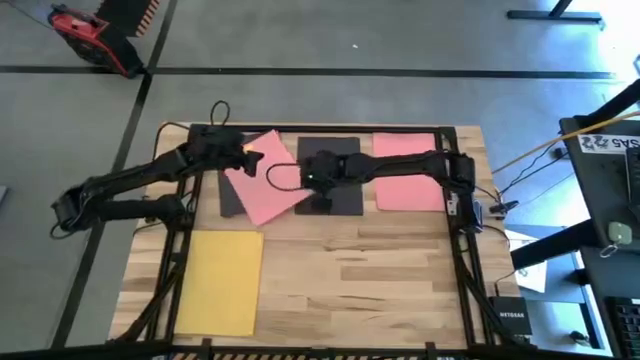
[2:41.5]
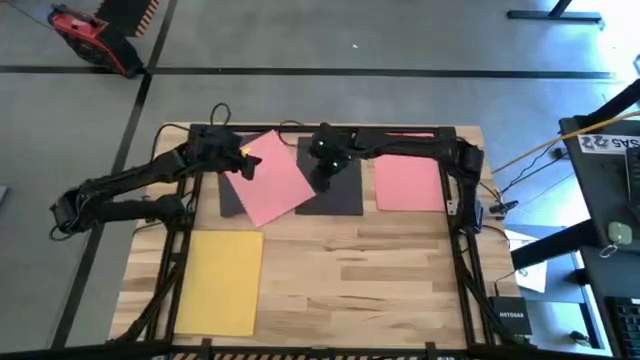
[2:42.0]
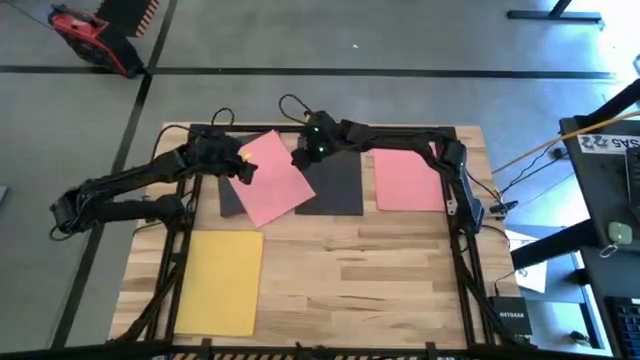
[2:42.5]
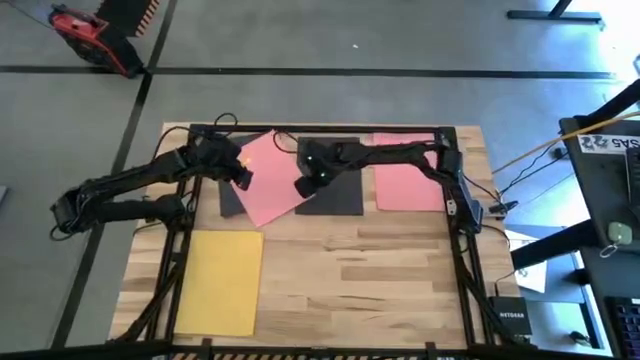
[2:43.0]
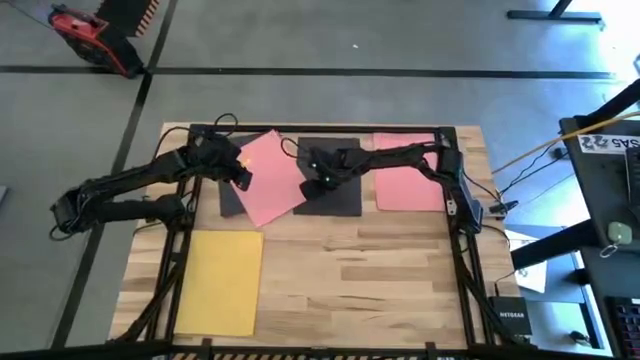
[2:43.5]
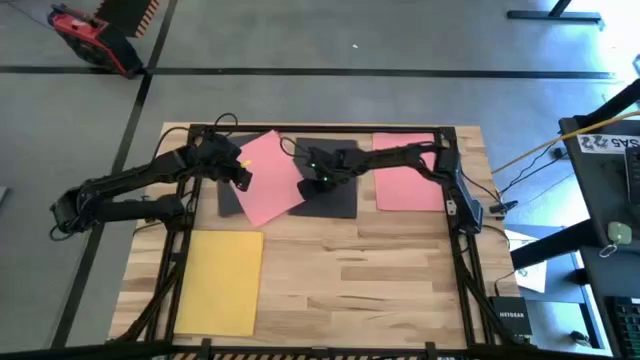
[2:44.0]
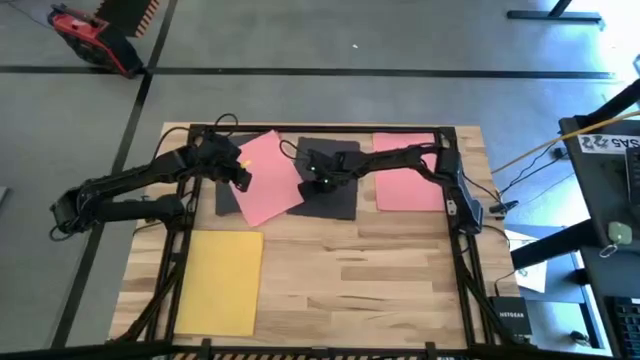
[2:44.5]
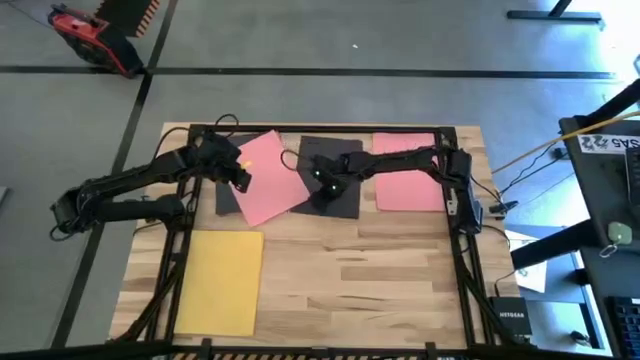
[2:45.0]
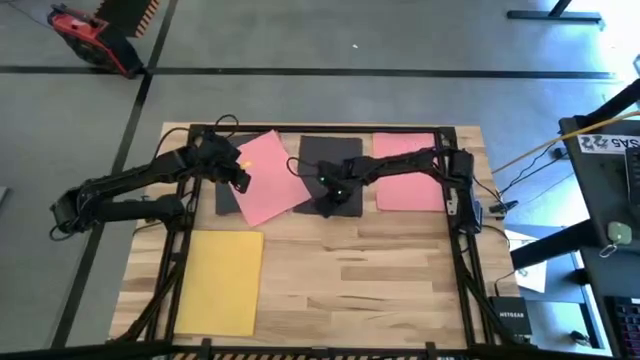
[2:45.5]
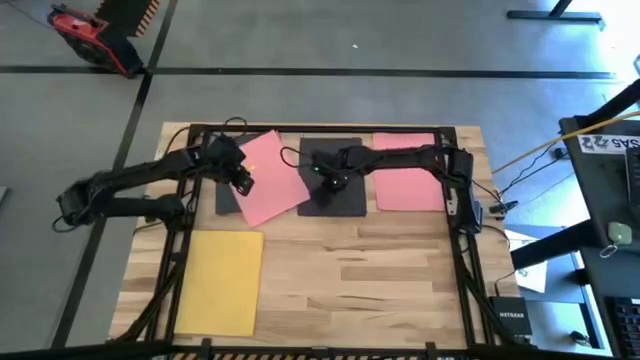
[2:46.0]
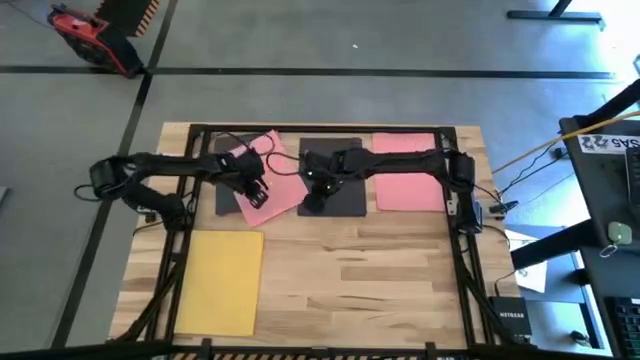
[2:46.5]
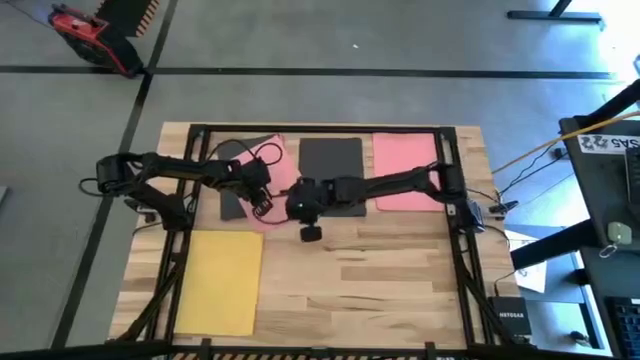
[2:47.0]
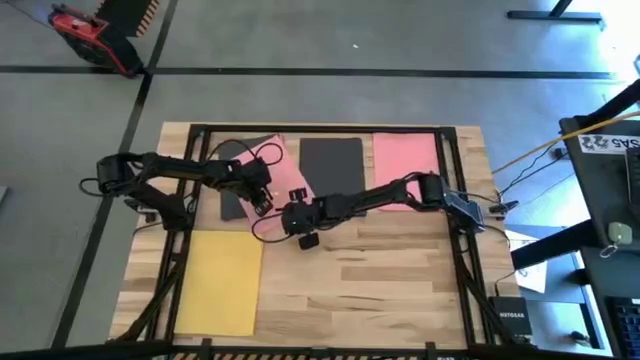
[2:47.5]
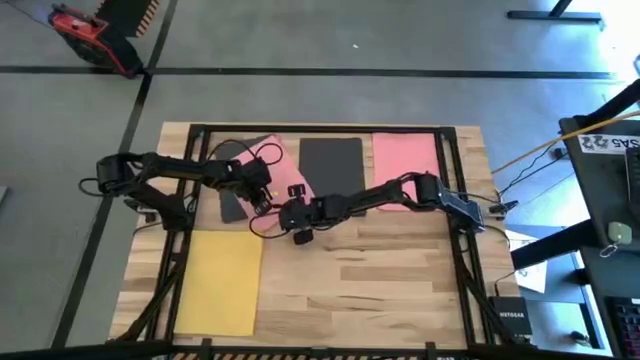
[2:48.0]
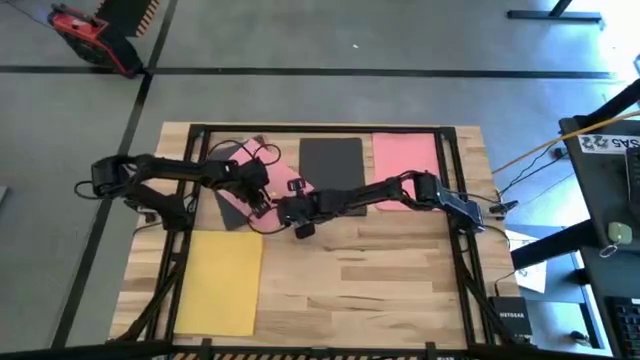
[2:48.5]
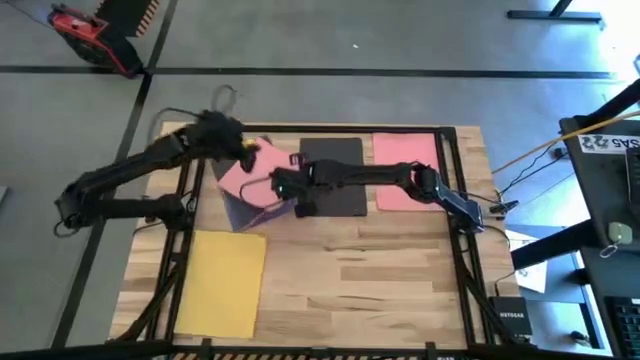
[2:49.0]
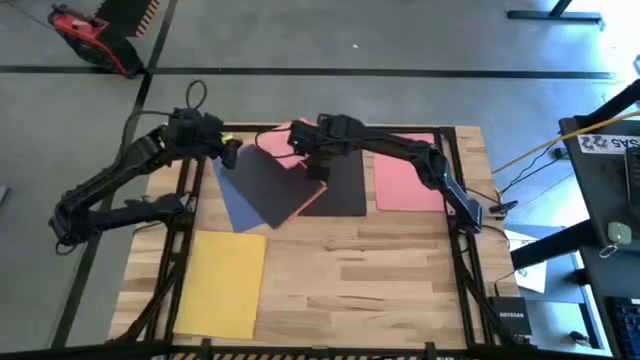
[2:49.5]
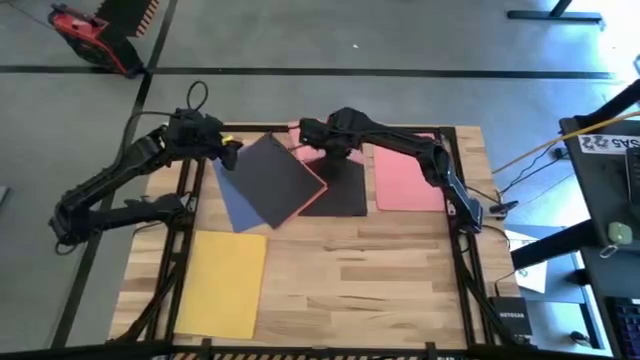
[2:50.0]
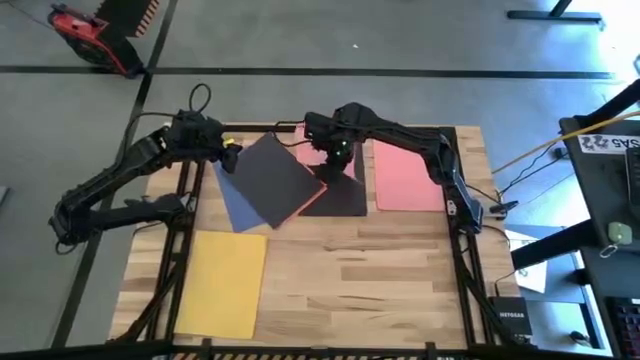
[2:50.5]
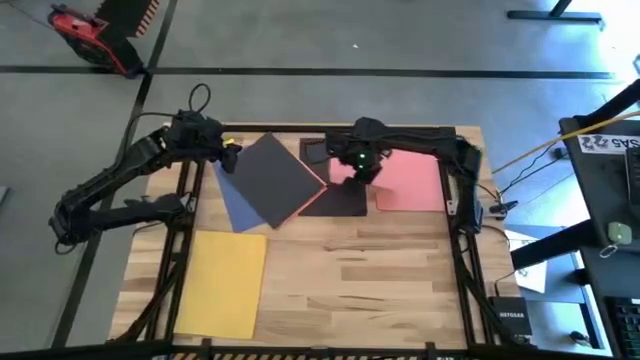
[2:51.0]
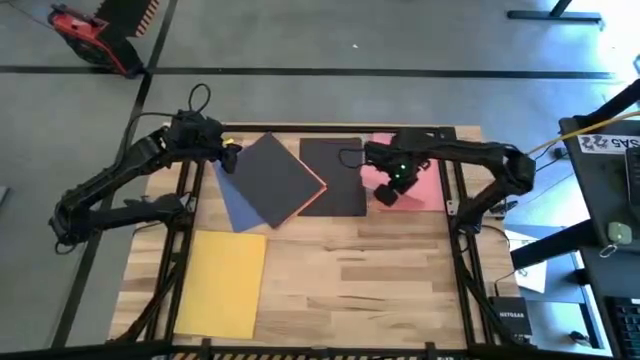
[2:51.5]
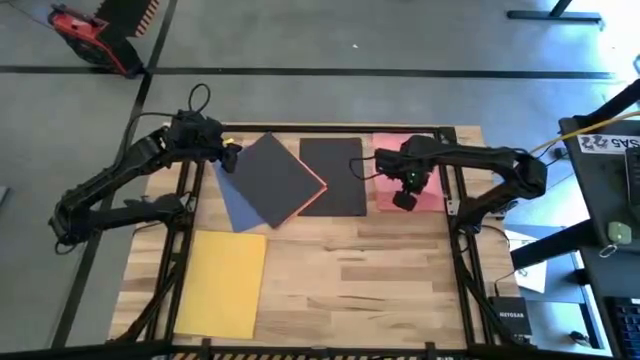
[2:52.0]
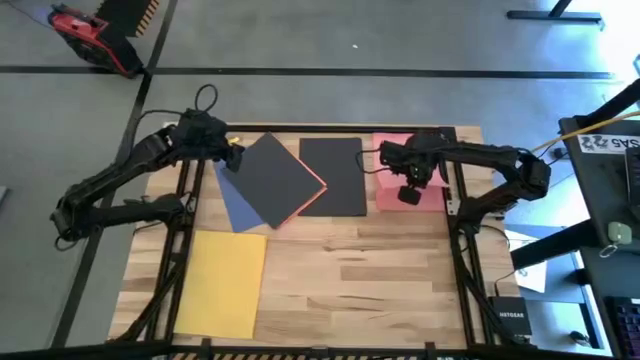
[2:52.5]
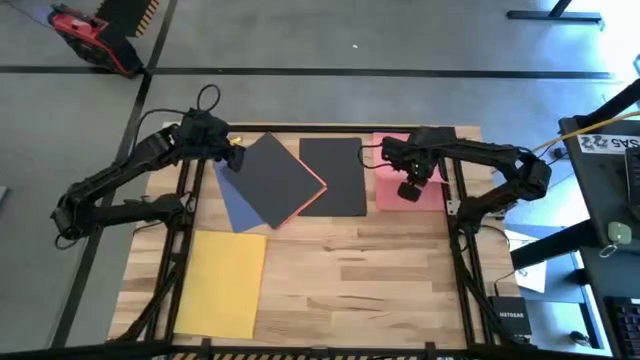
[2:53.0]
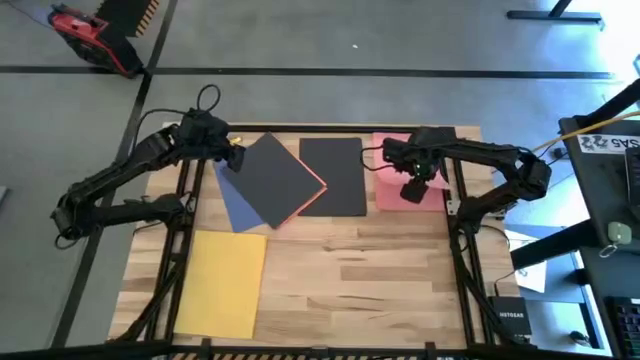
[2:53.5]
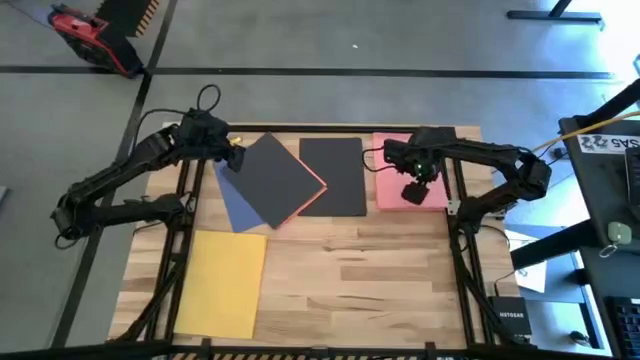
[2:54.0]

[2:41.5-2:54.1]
Task: Organize paper
Stack the pink paper on top of the stacked pink papers

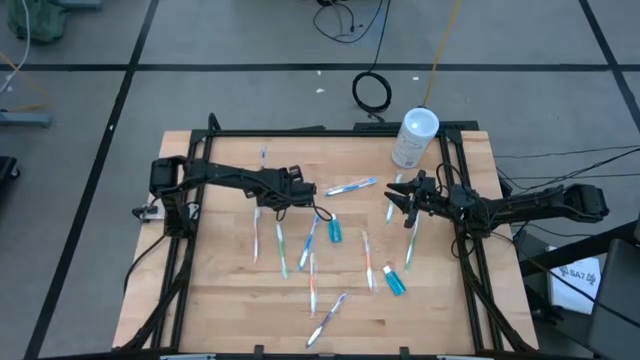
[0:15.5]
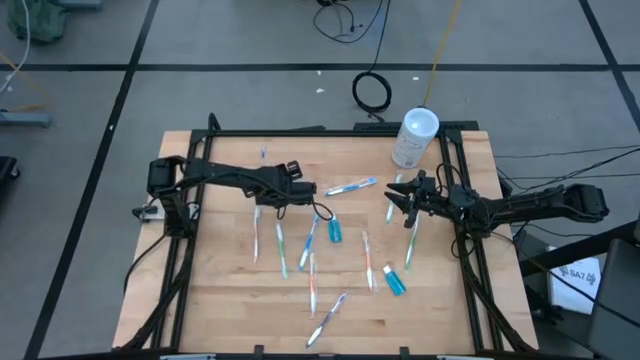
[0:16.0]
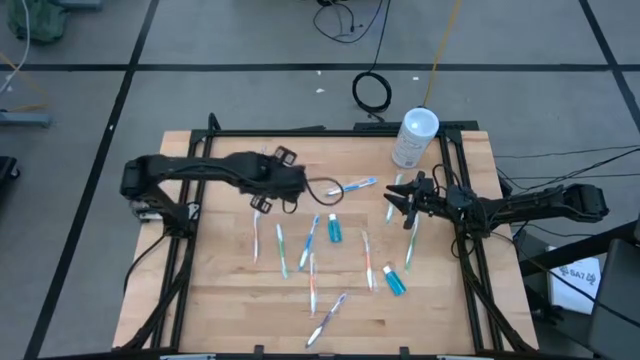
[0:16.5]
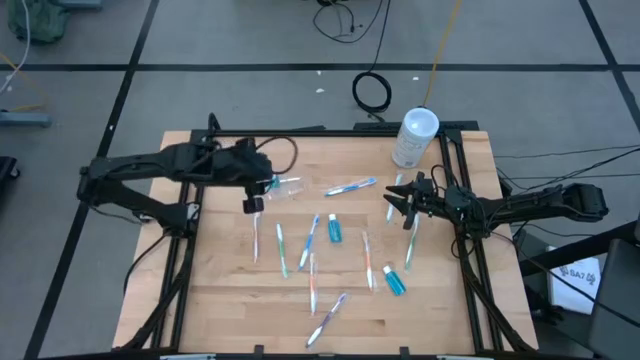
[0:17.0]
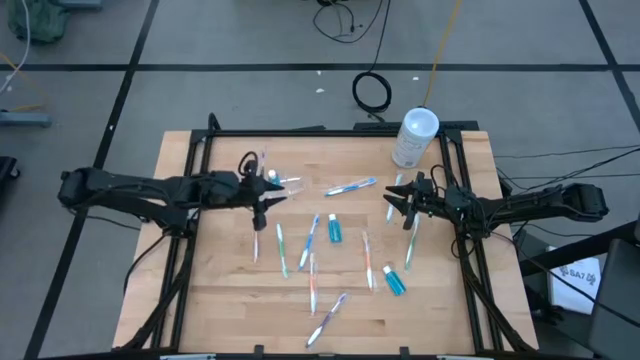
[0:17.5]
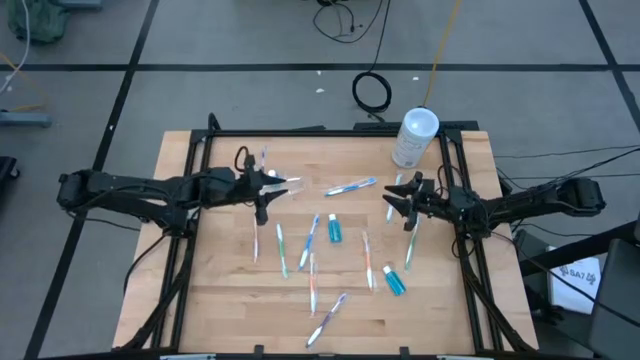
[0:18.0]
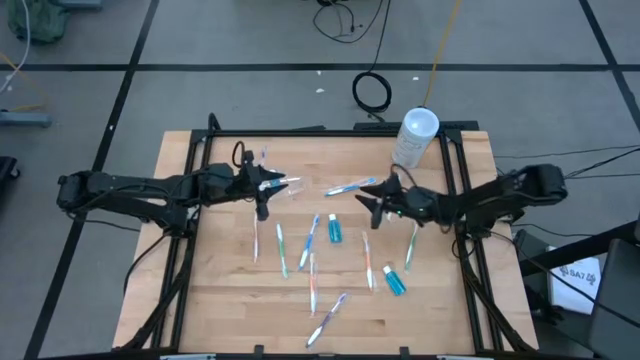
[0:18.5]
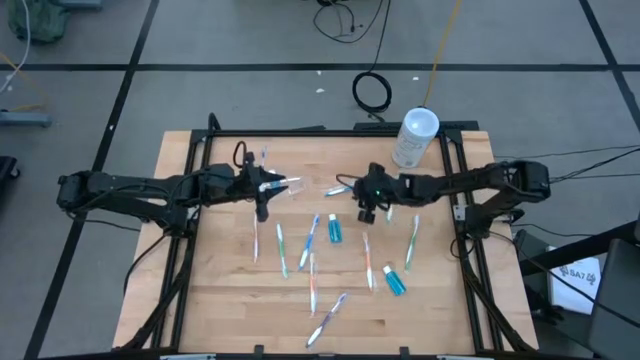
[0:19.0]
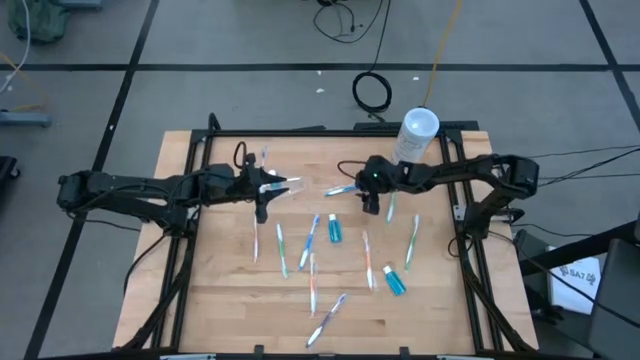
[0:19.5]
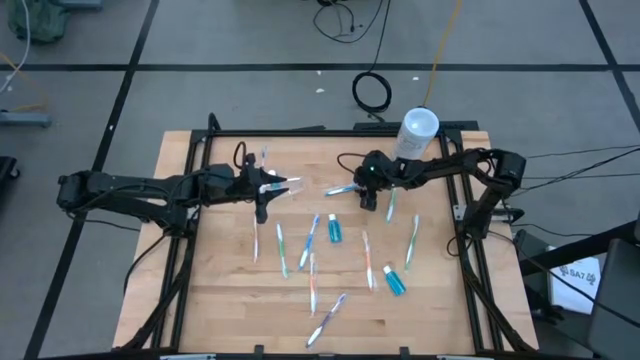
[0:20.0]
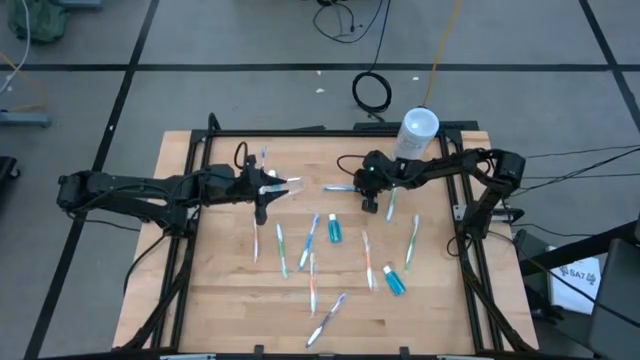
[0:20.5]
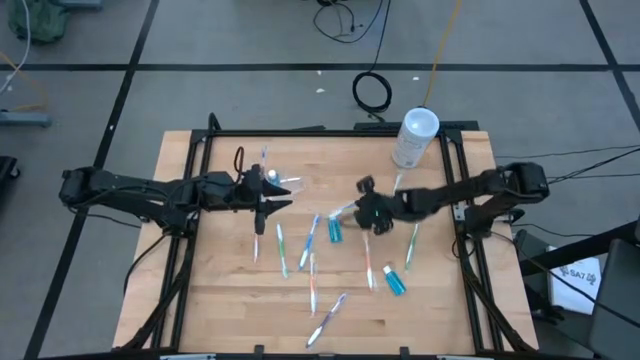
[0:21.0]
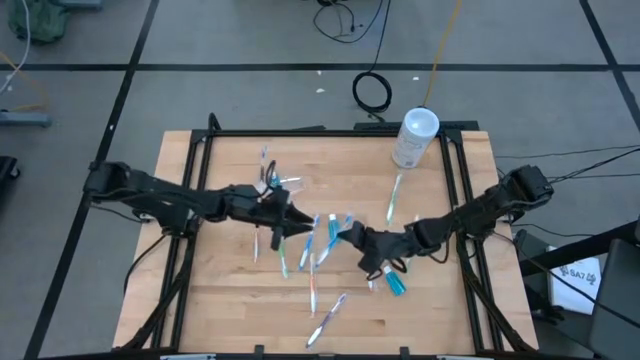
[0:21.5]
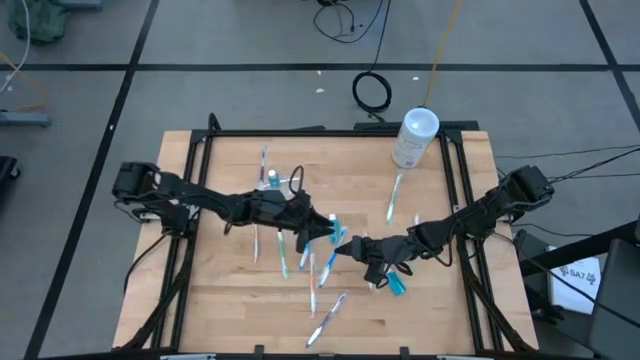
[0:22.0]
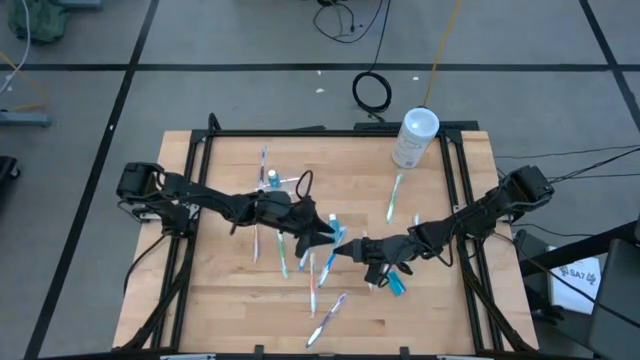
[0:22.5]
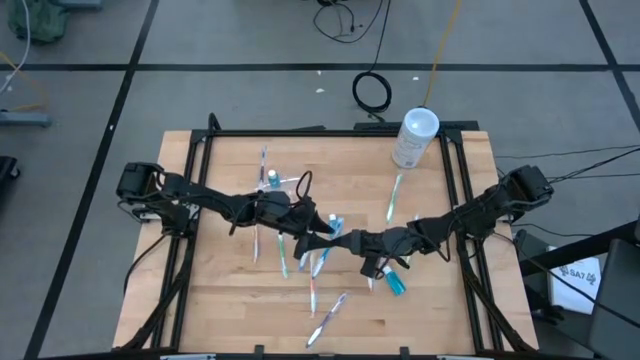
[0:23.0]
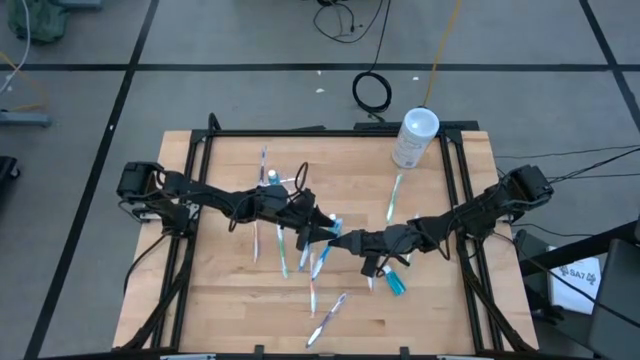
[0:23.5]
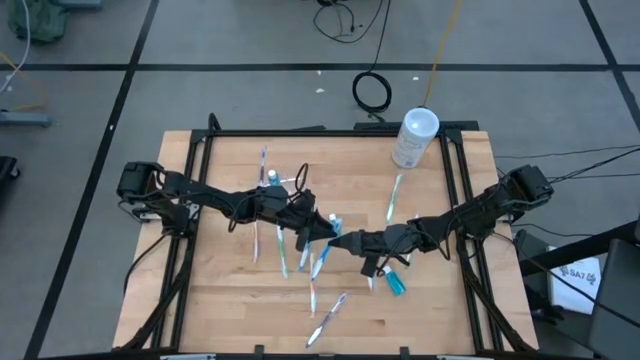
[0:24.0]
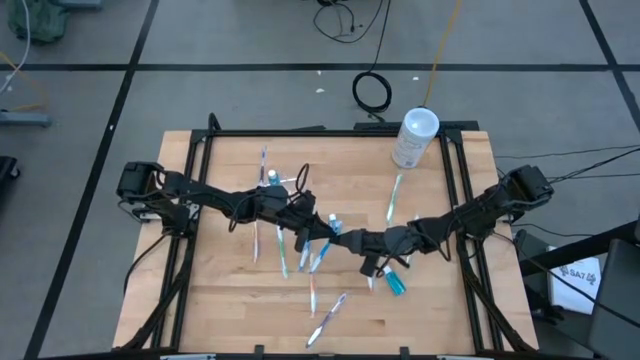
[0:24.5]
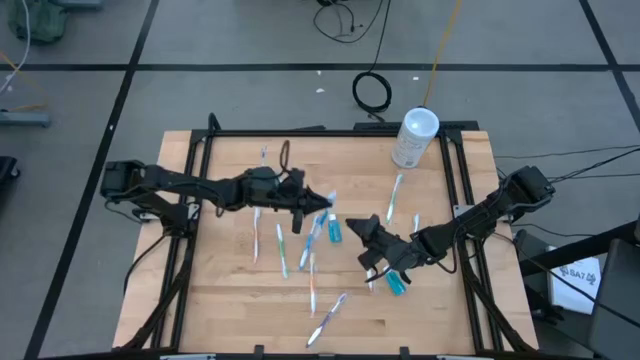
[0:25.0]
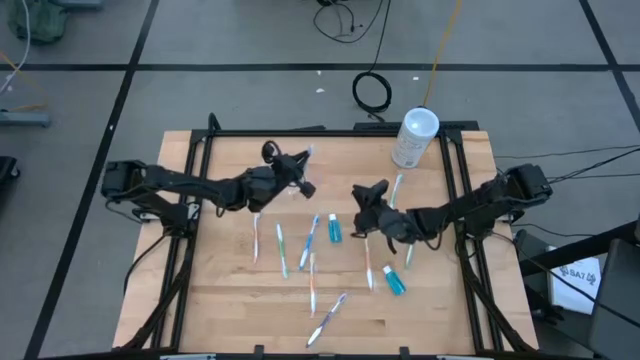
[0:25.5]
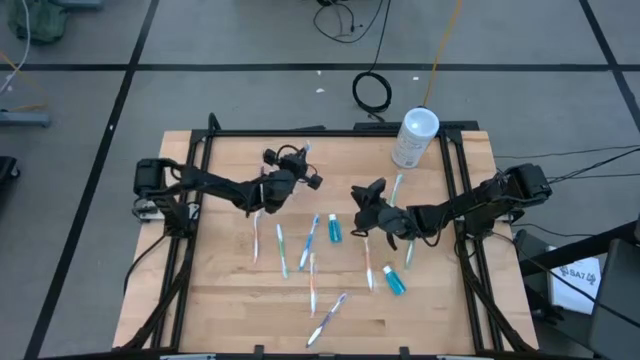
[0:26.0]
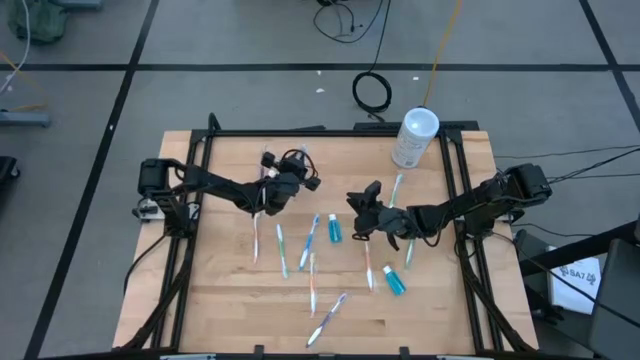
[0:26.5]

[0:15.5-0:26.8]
Task: Pick & Place toothbrushing station
Put the top blue toothbrush into the right compartment of the transparent organizer
